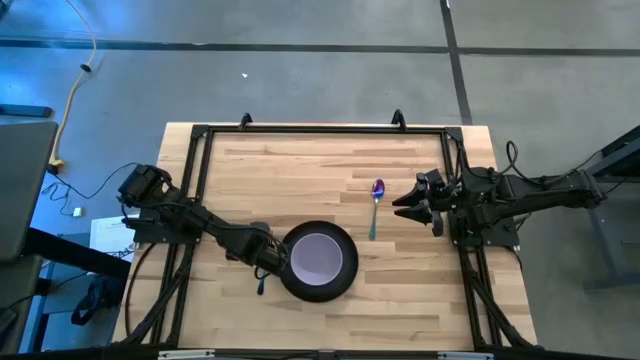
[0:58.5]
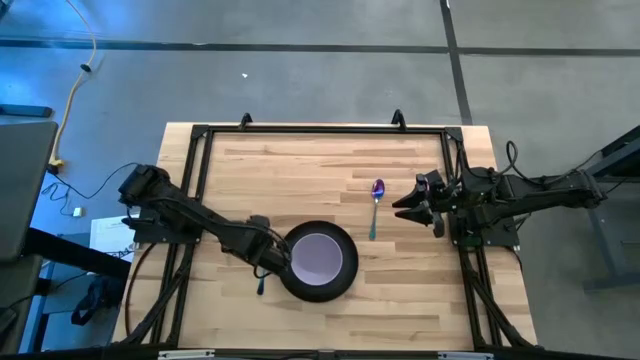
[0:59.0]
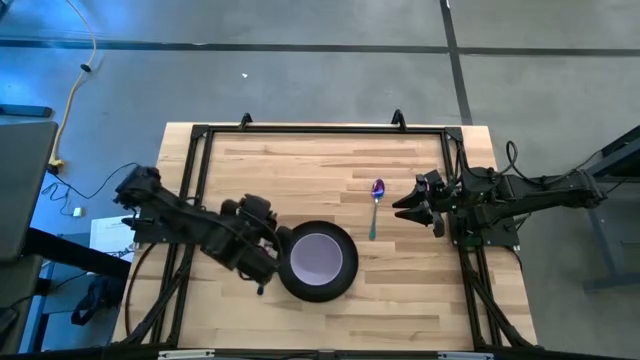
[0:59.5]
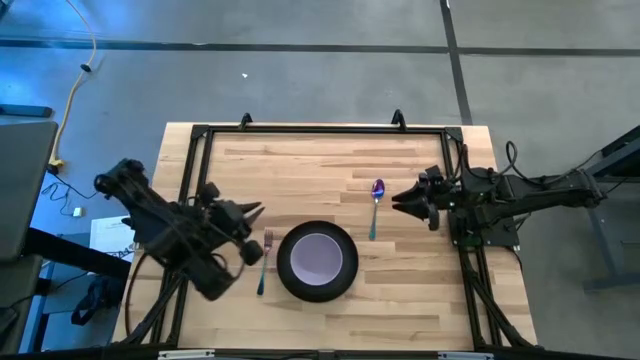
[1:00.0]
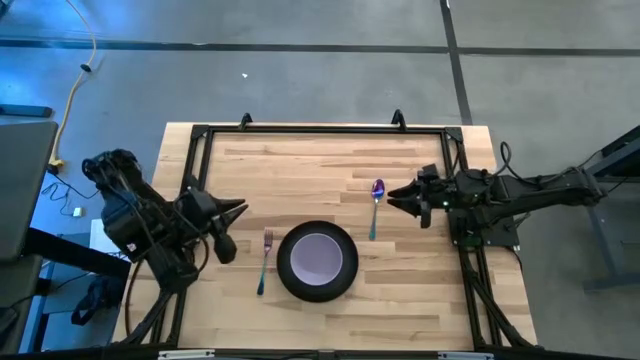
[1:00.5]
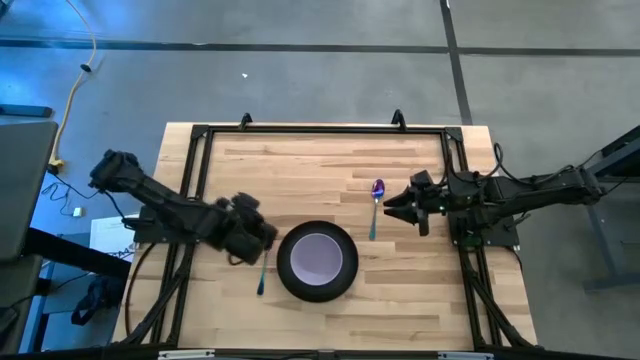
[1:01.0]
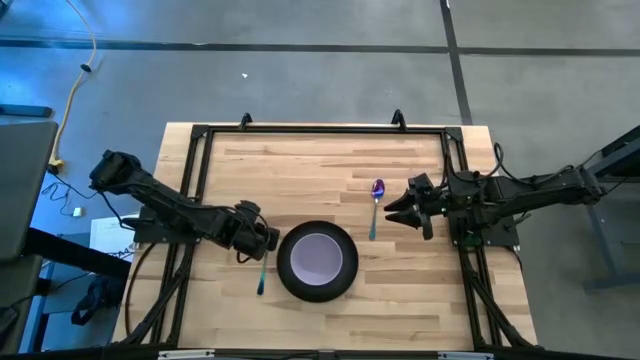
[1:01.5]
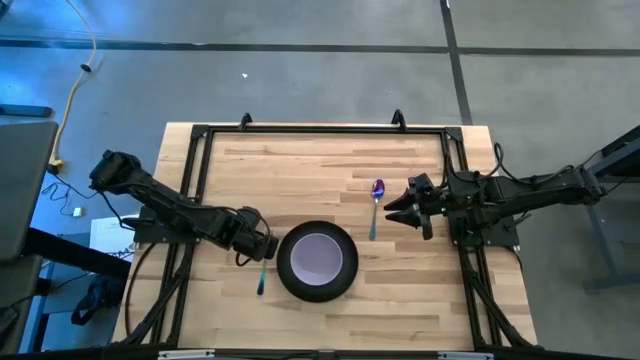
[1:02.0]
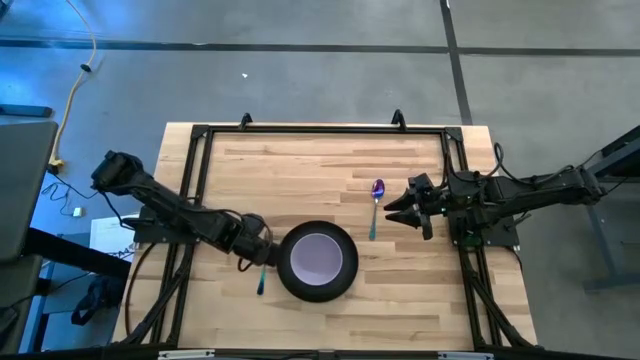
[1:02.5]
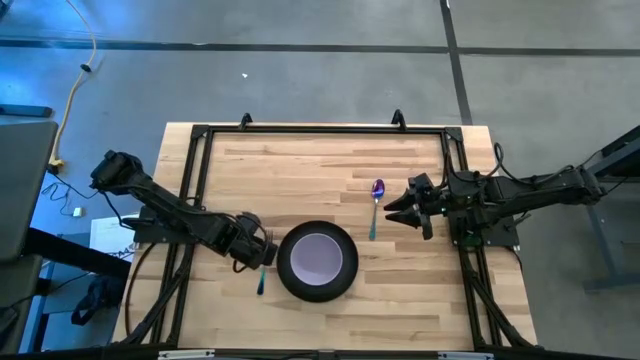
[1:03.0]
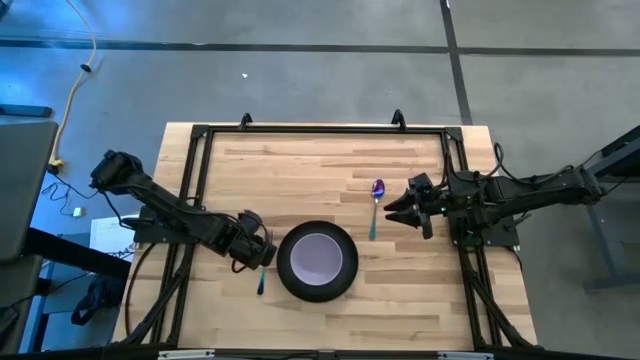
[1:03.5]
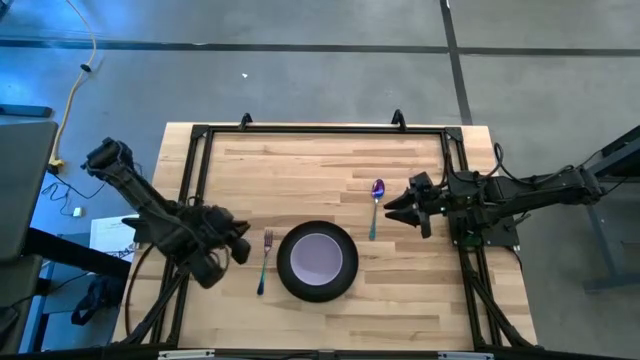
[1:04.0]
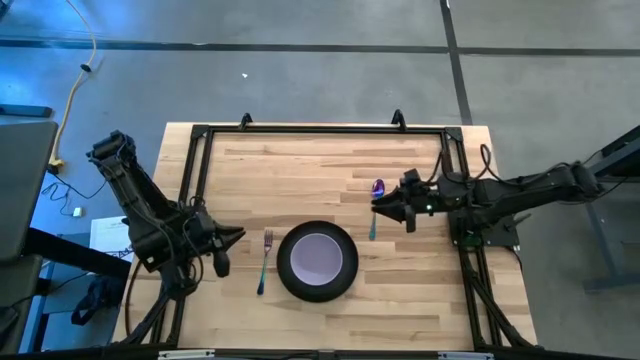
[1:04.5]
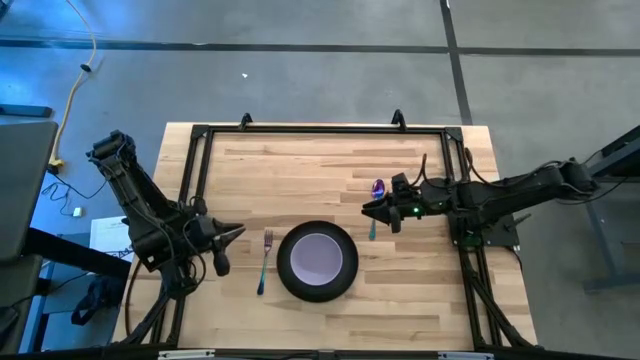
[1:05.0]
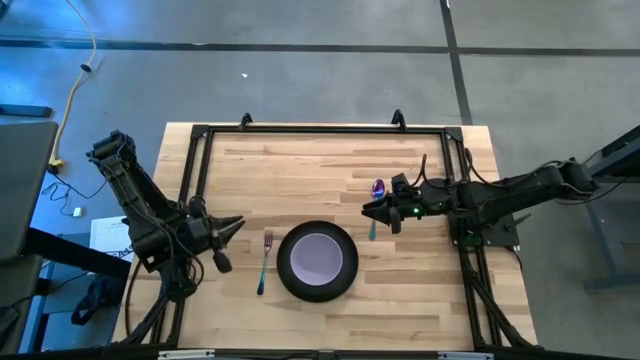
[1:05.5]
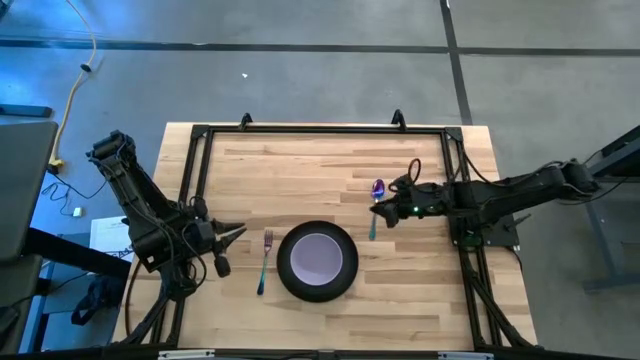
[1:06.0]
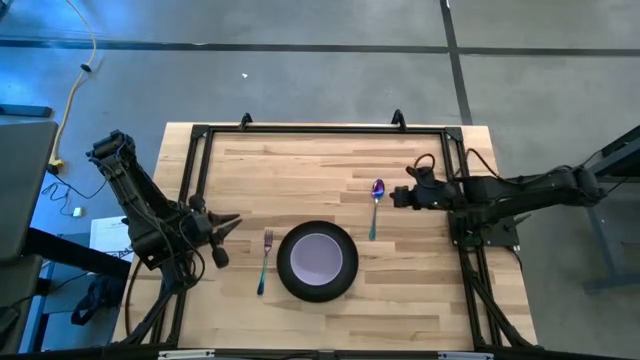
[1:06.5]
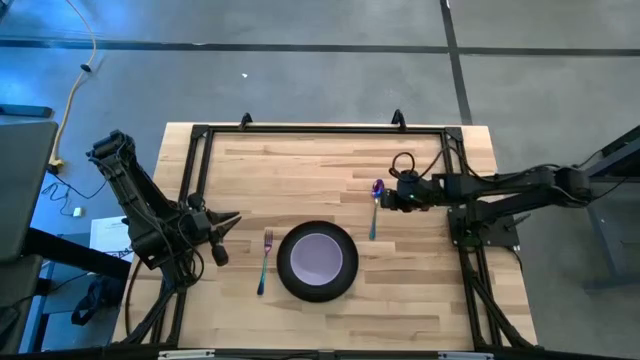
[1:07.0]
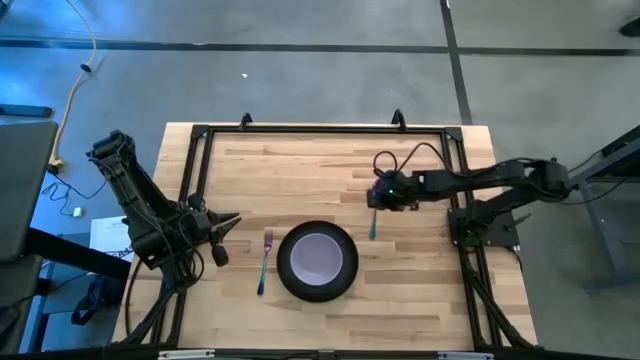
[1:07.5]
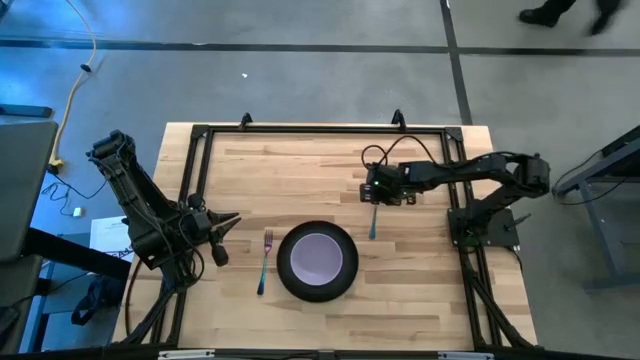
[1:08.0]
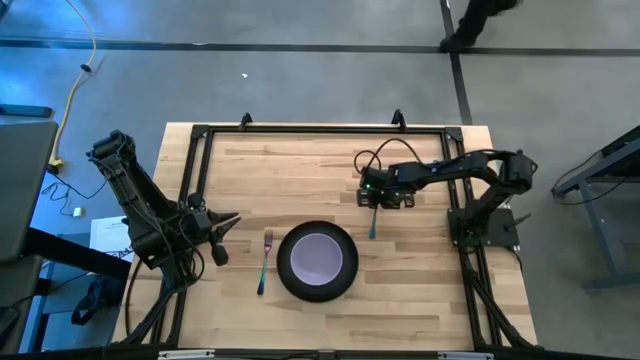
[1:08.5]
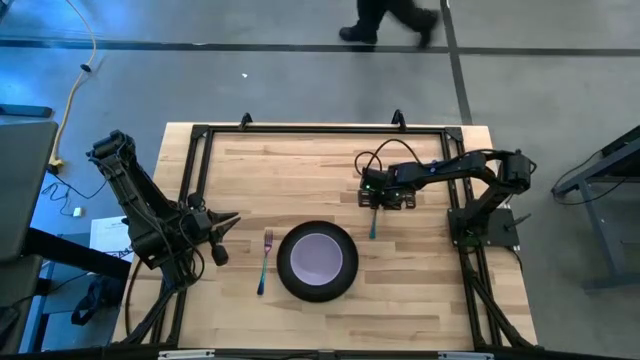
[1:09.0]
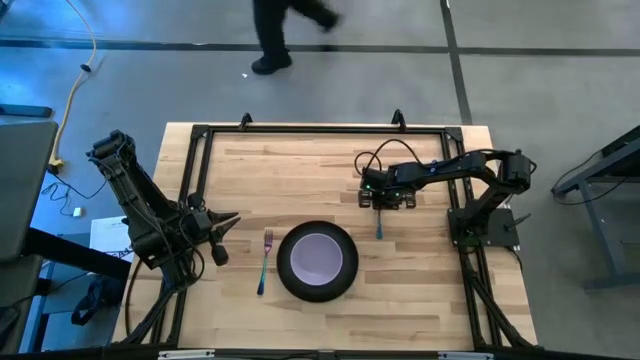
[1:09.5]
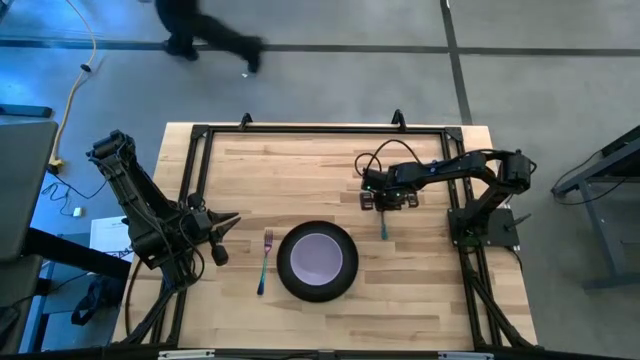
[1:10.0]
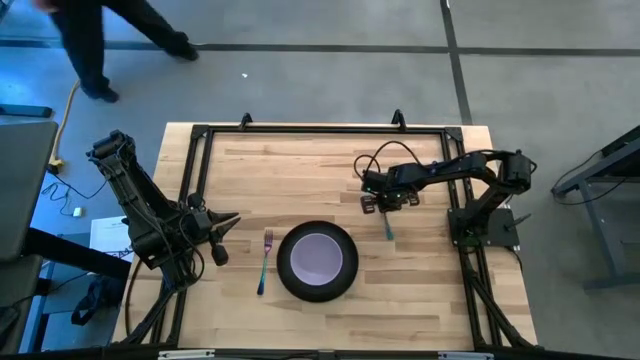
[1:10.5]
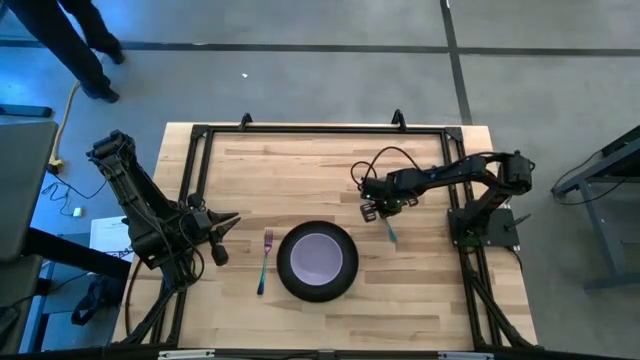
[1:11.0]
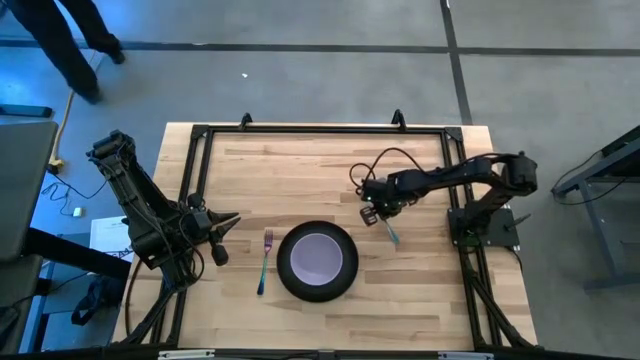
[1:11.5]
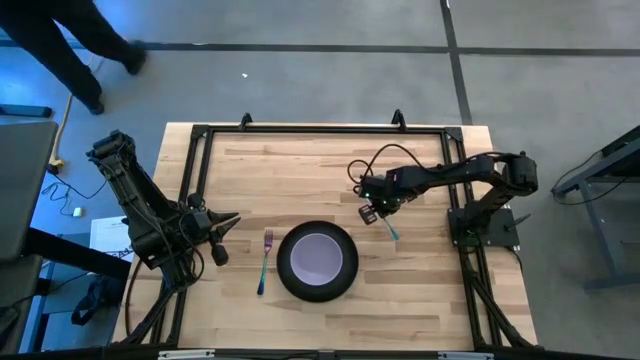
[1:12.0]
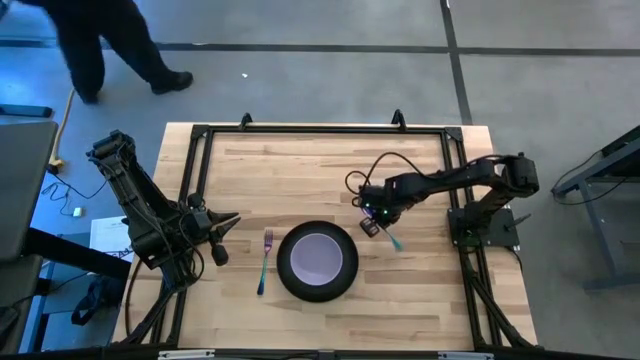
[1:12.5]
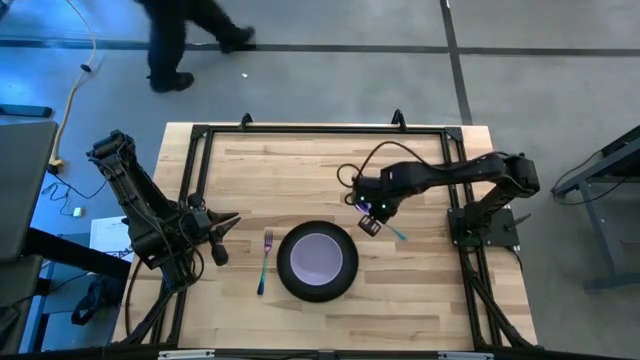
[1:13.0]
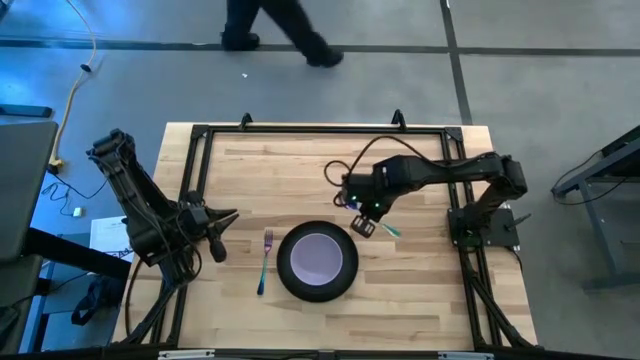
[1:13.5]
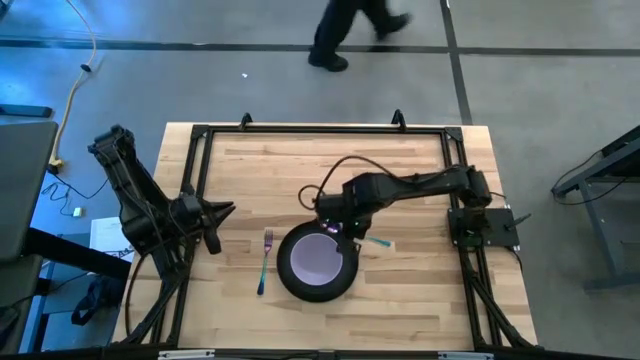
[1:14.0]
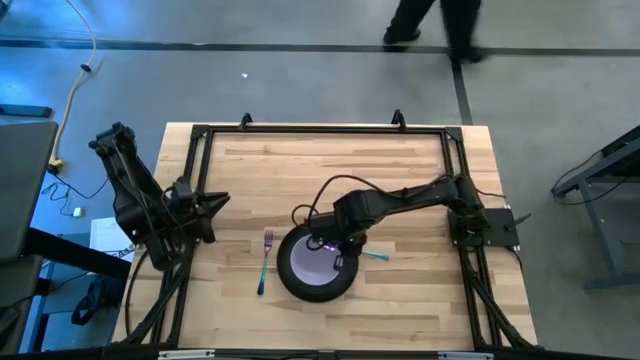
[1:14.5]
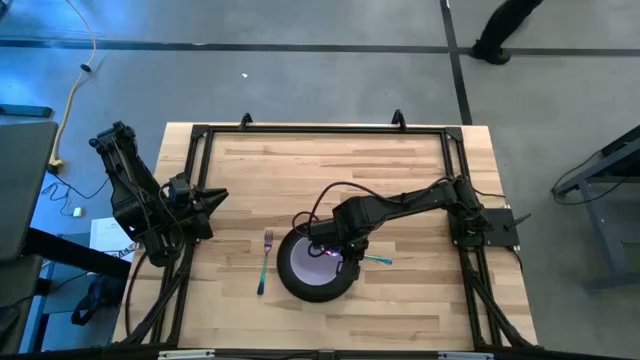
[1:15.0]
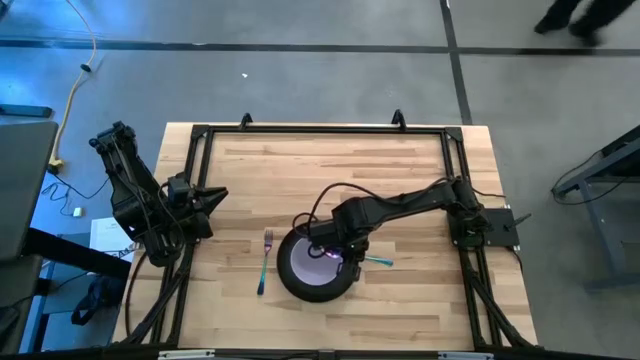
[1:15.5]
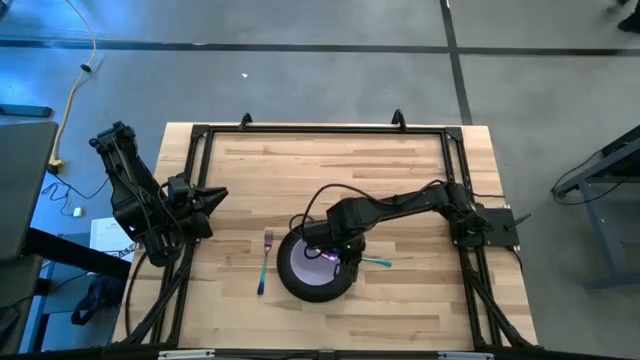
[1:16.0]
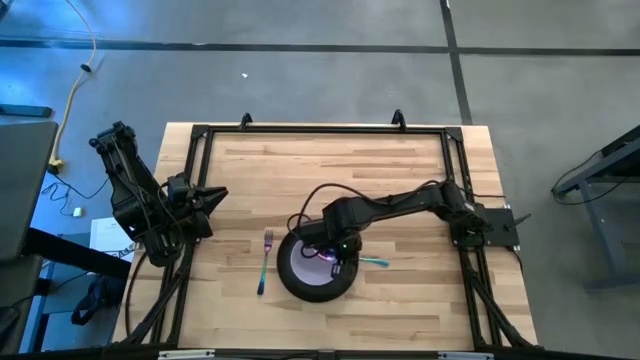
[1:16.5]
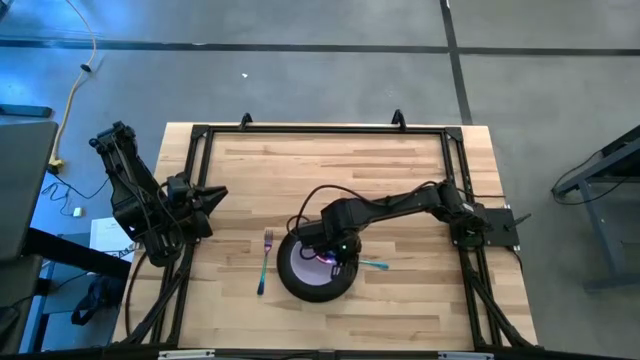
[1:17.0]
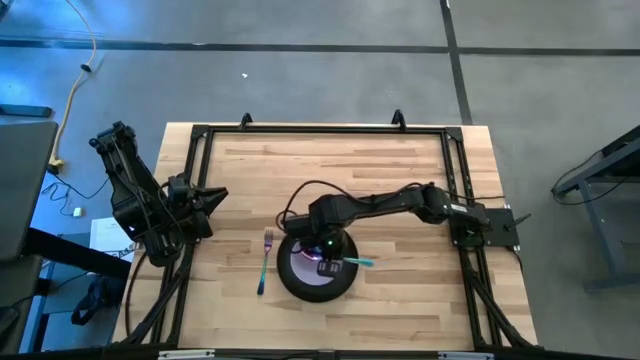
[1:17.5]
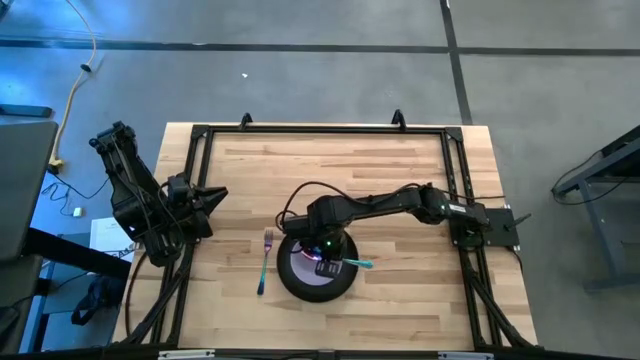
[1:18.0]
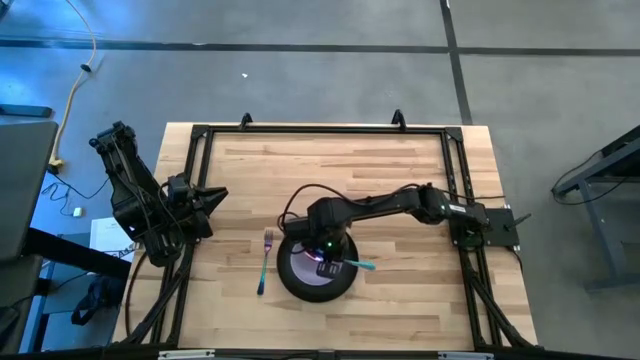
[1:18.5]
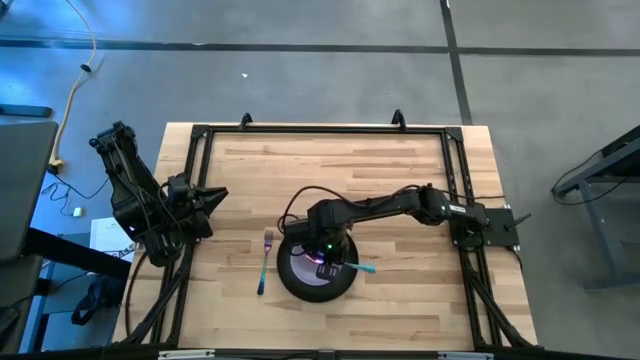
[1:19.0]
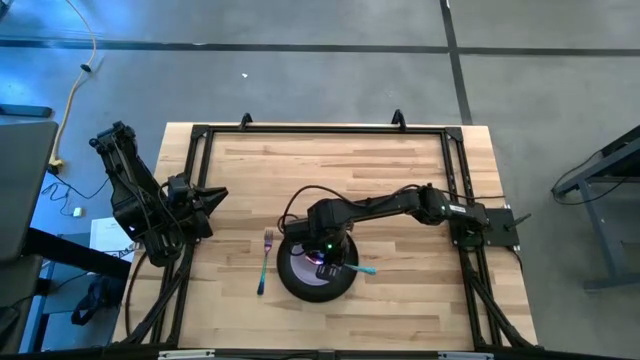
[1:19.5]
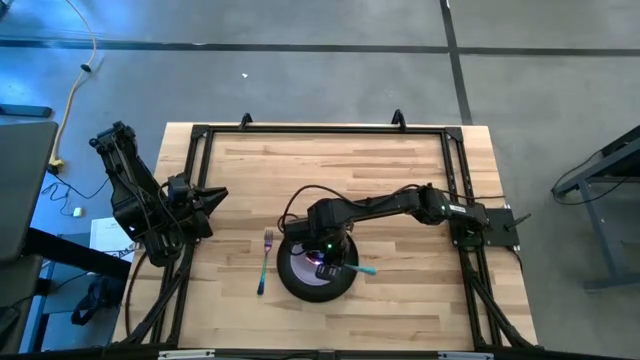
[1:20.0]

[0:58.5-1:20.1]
Task: Set table place
Put the violet spoon into the violet bowl
